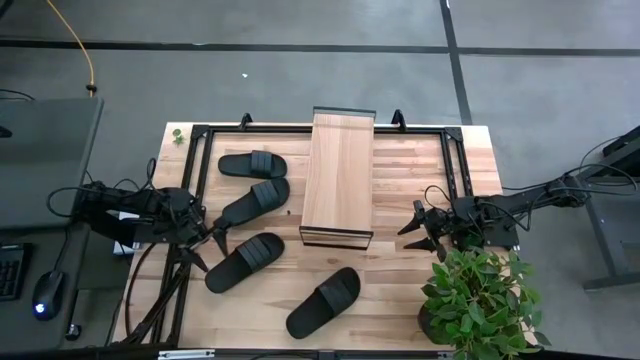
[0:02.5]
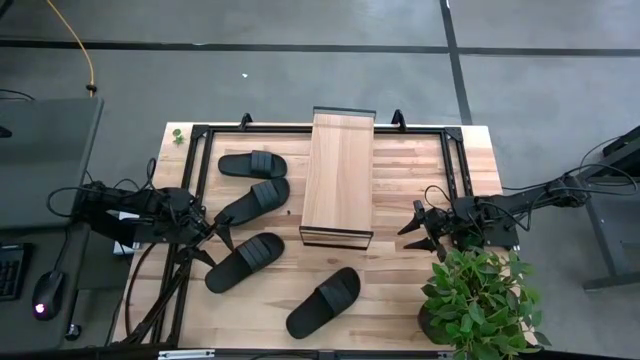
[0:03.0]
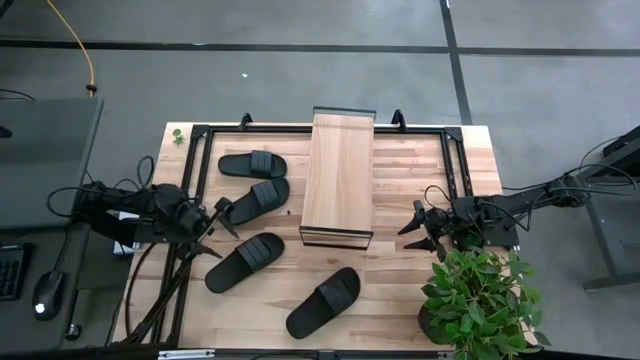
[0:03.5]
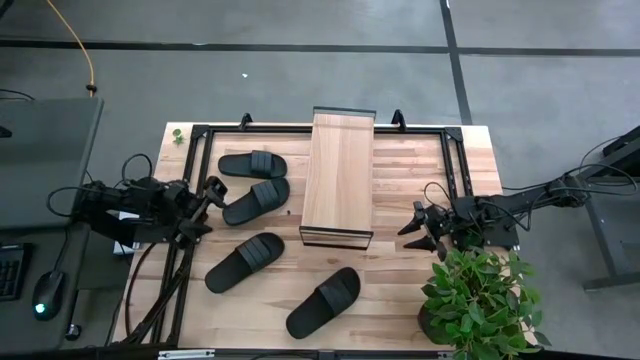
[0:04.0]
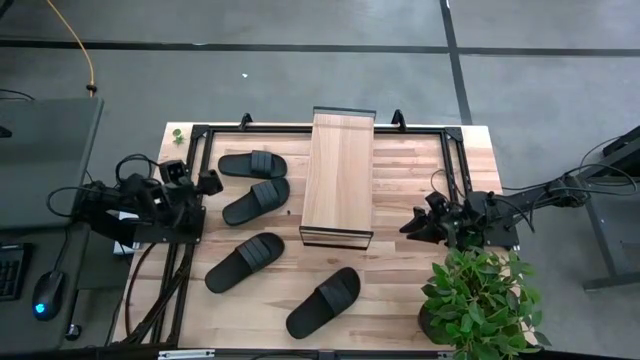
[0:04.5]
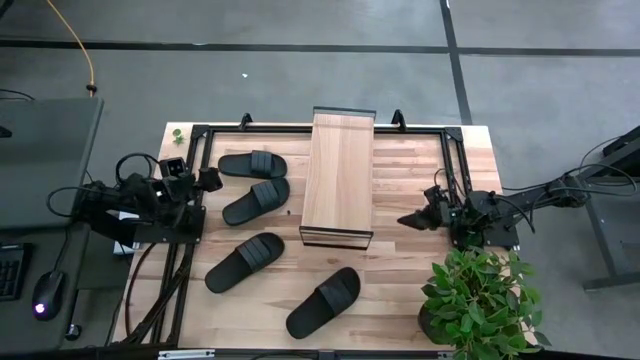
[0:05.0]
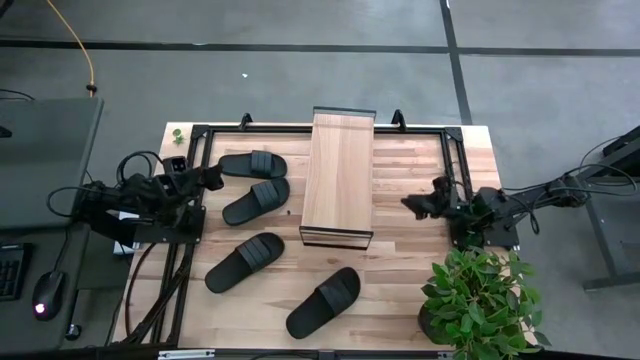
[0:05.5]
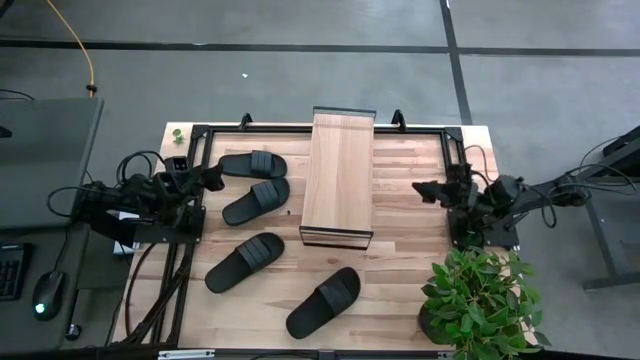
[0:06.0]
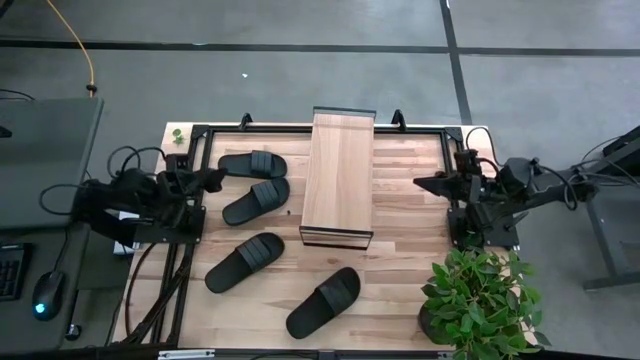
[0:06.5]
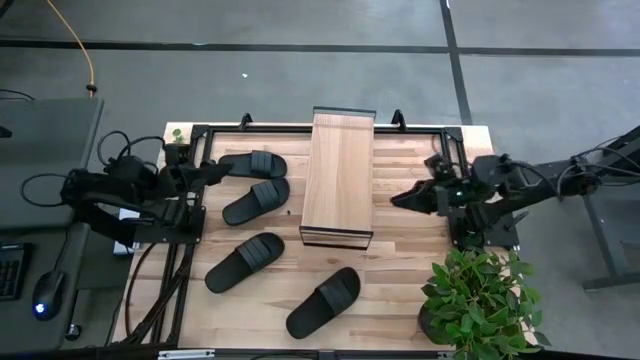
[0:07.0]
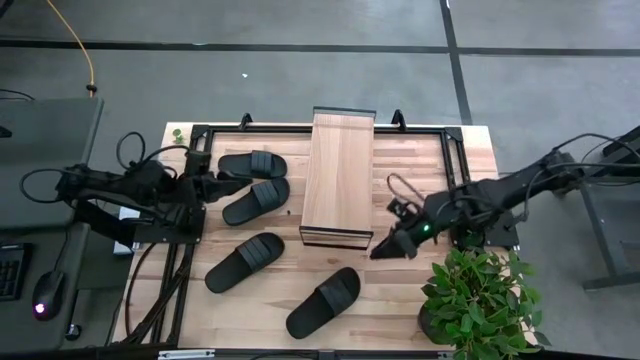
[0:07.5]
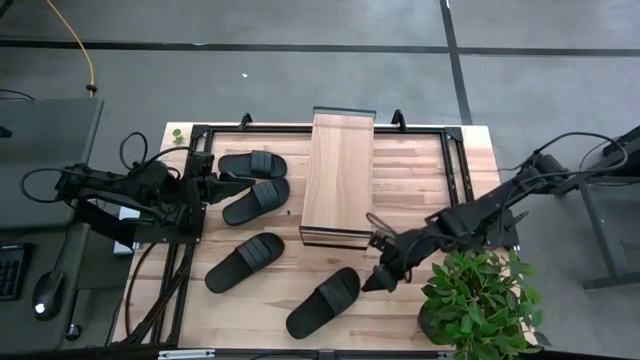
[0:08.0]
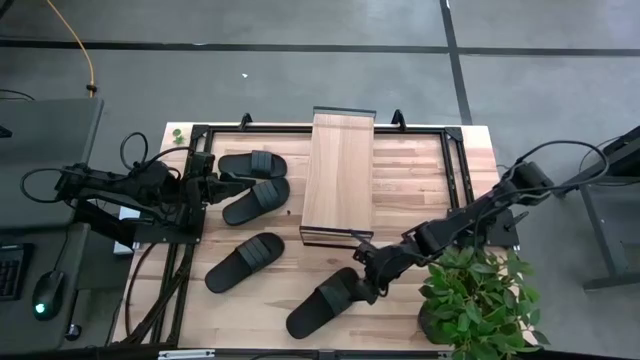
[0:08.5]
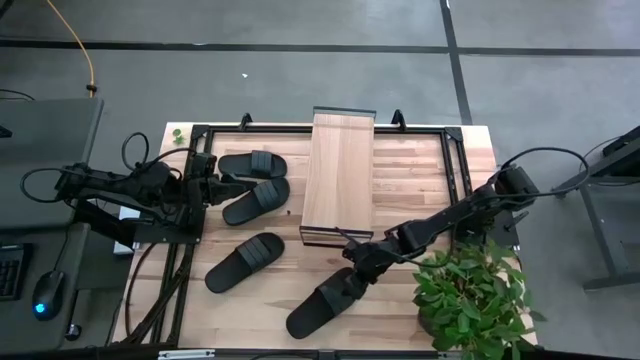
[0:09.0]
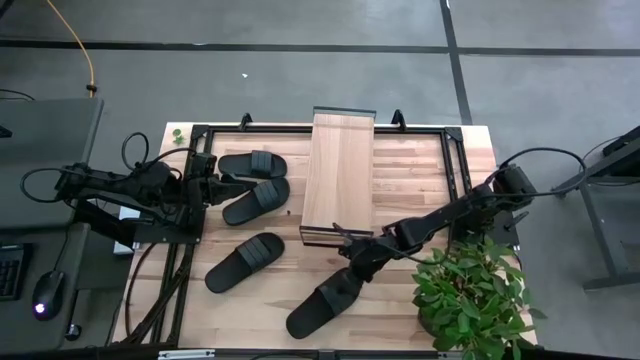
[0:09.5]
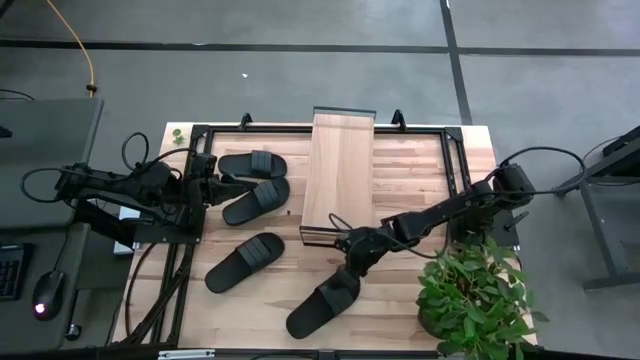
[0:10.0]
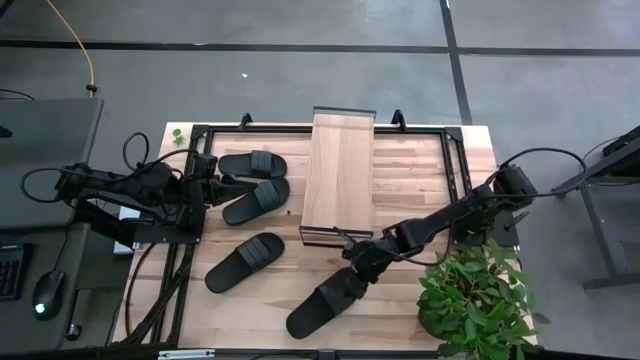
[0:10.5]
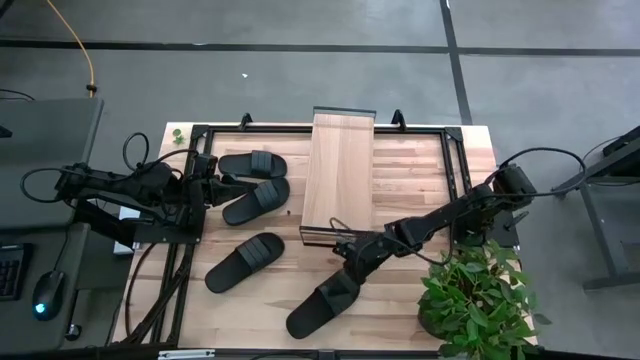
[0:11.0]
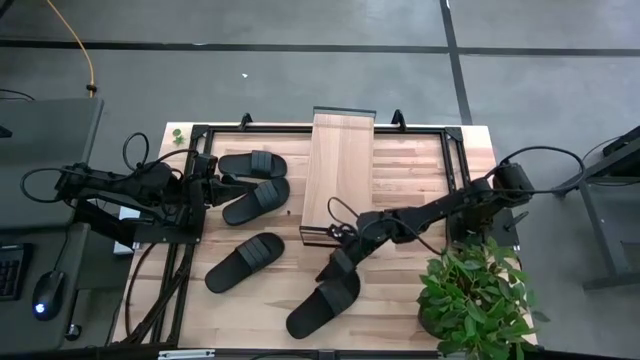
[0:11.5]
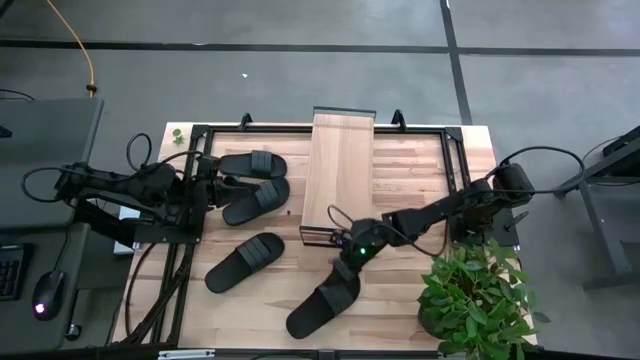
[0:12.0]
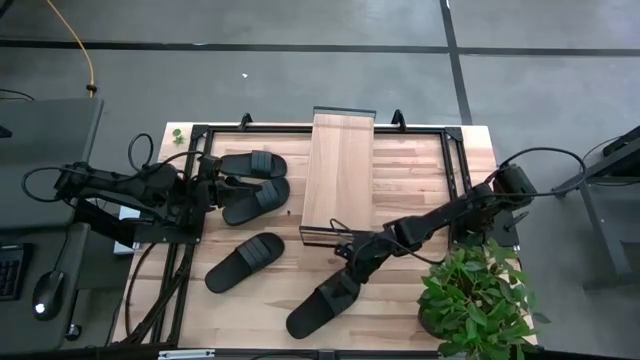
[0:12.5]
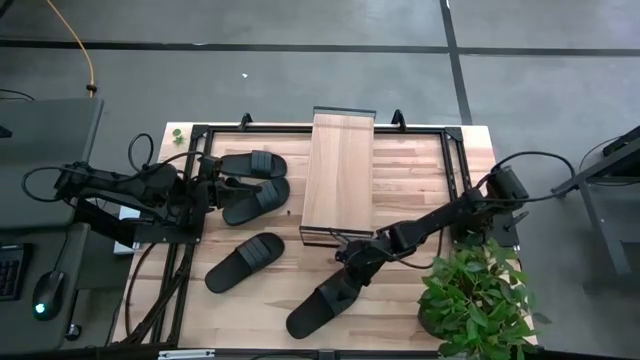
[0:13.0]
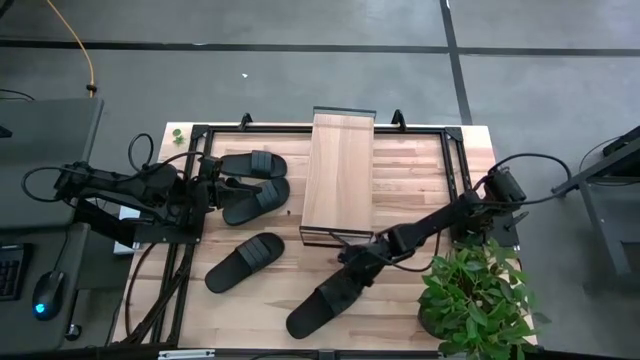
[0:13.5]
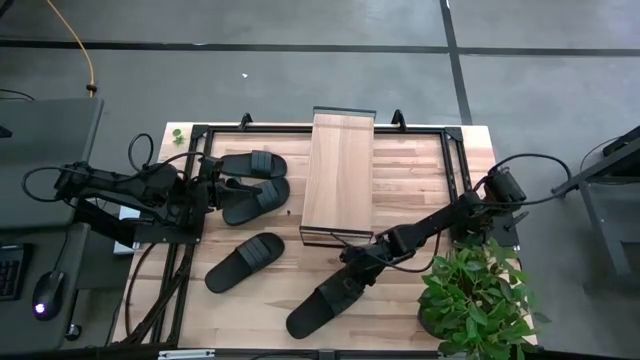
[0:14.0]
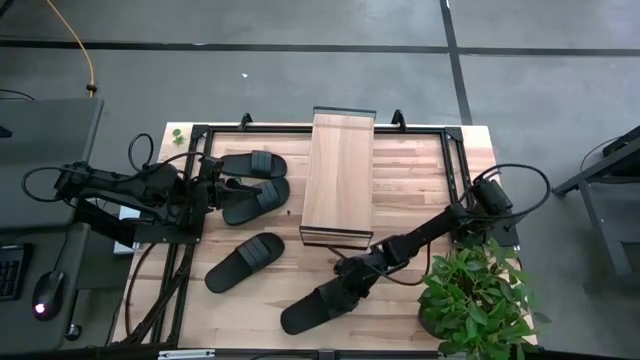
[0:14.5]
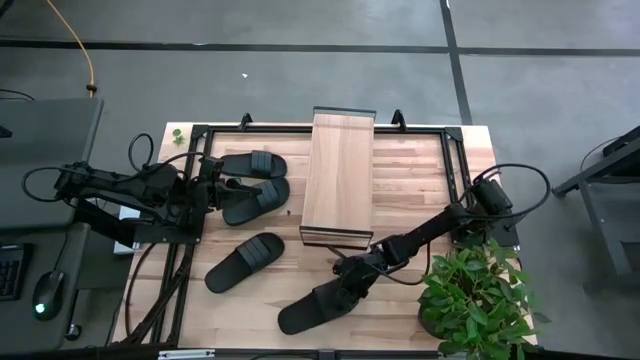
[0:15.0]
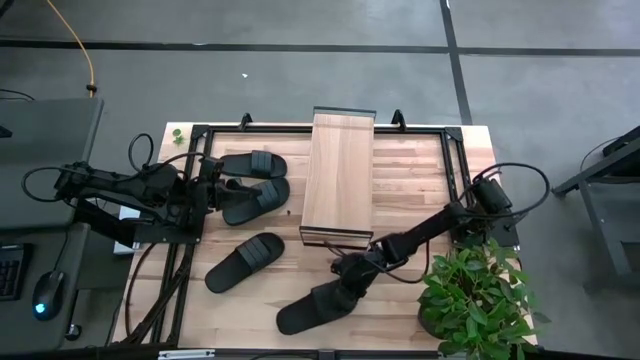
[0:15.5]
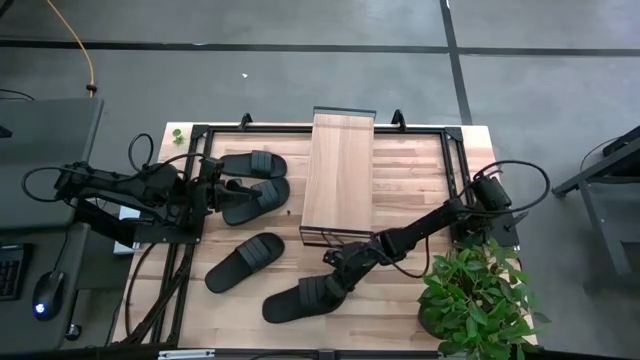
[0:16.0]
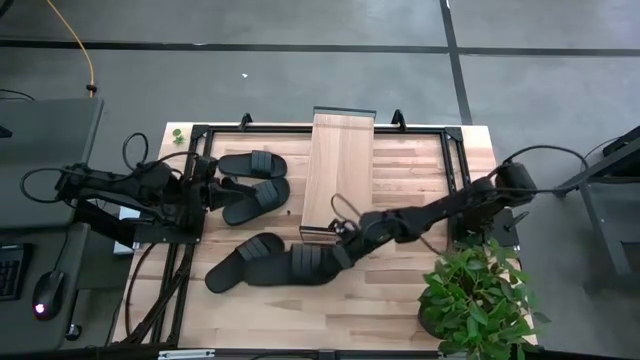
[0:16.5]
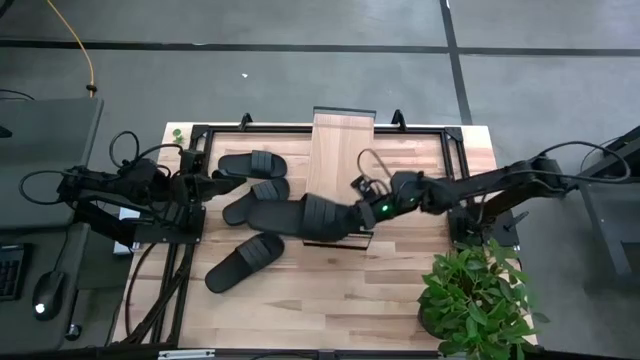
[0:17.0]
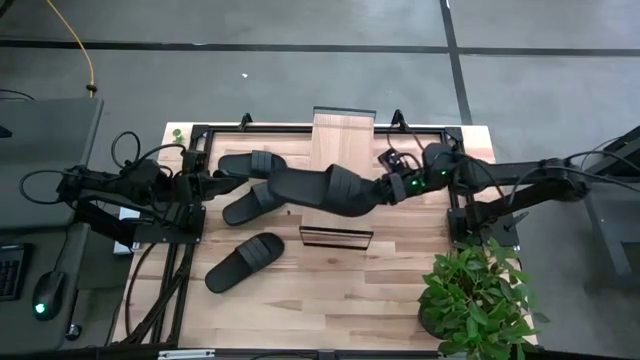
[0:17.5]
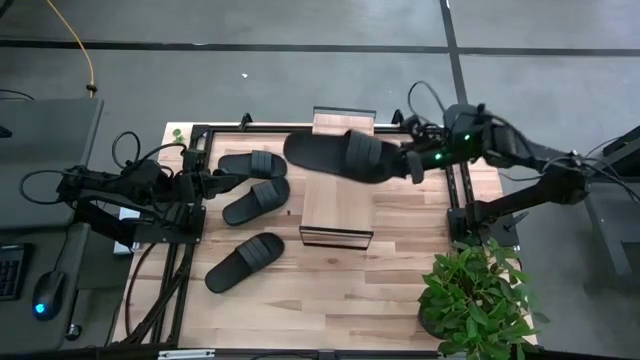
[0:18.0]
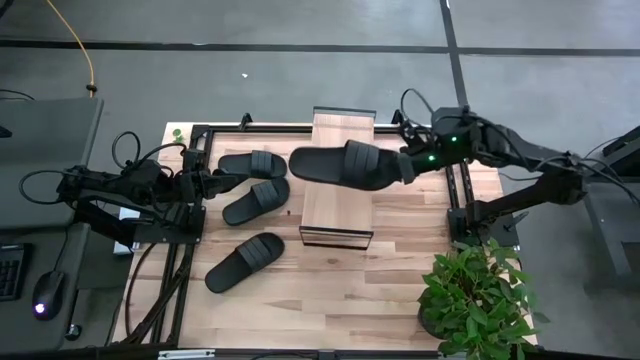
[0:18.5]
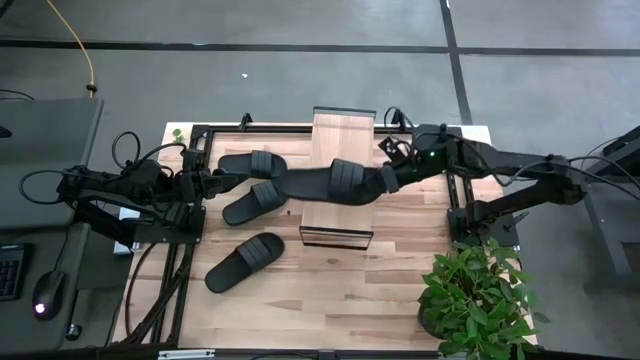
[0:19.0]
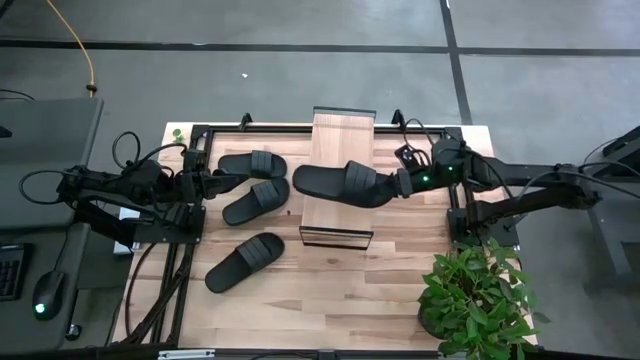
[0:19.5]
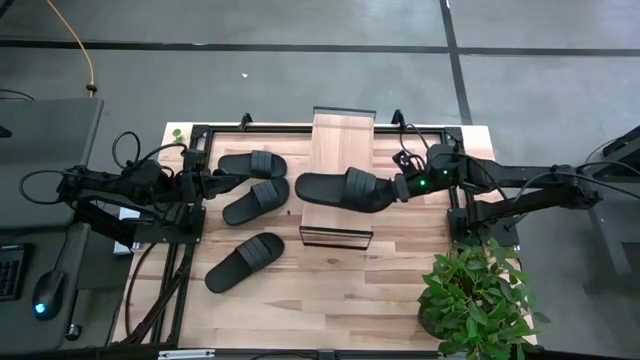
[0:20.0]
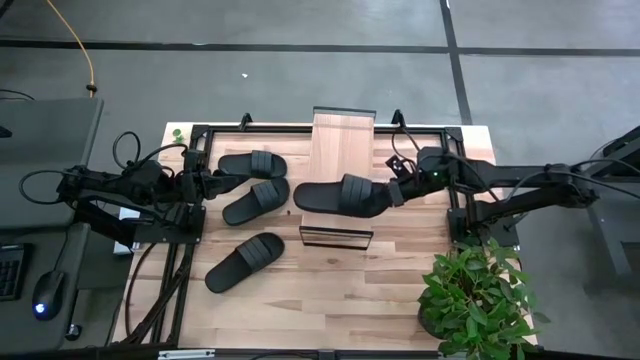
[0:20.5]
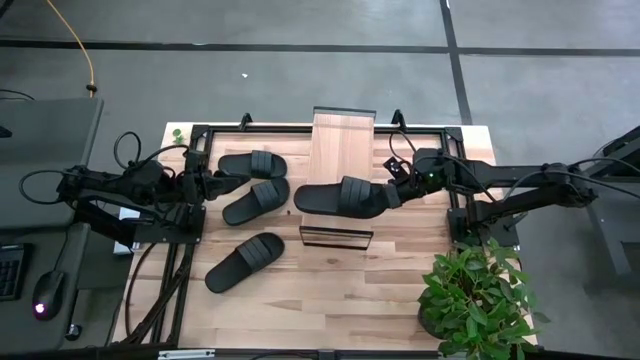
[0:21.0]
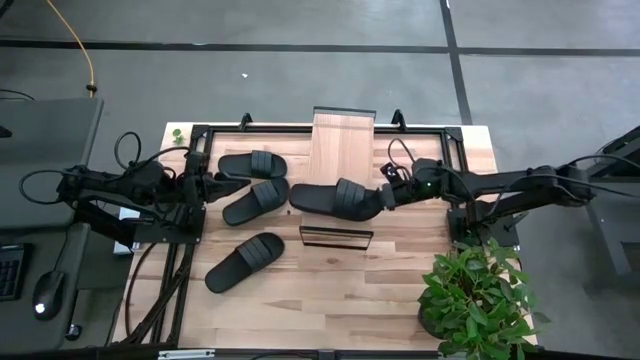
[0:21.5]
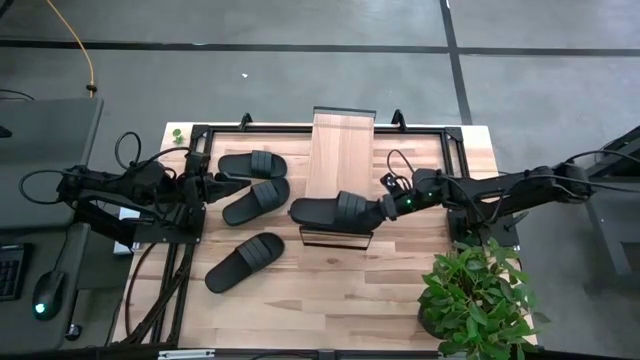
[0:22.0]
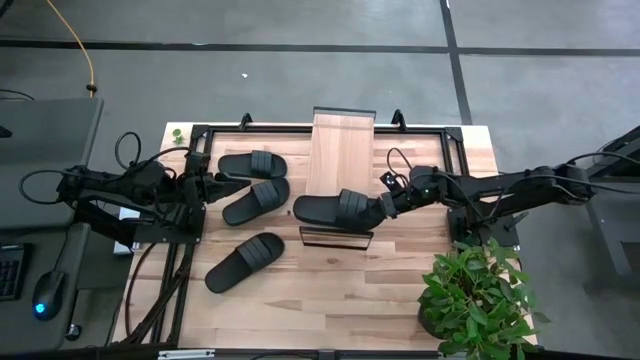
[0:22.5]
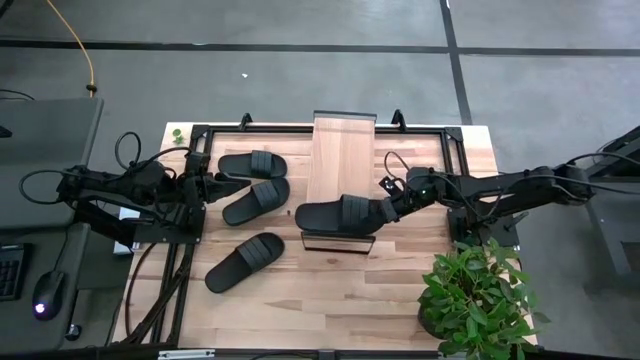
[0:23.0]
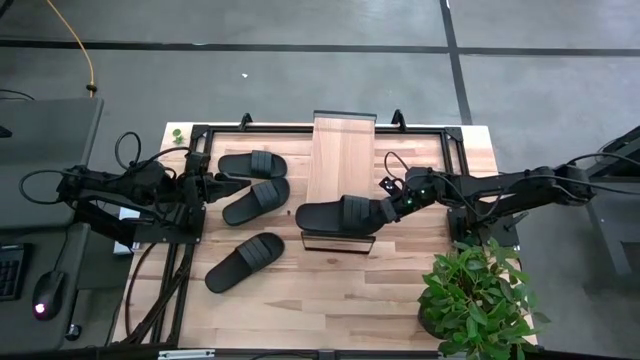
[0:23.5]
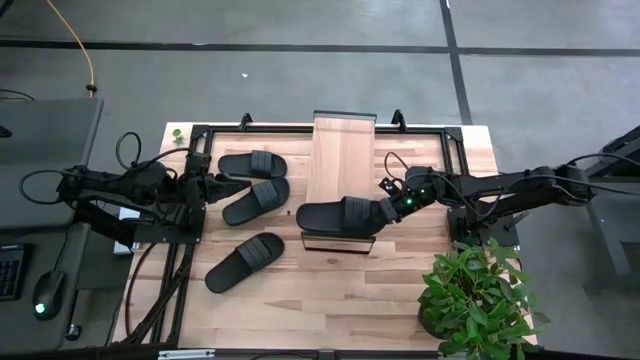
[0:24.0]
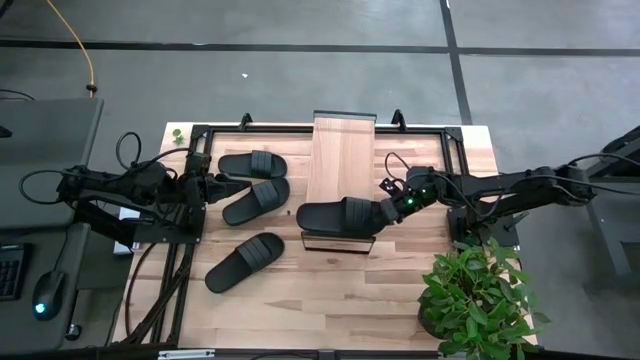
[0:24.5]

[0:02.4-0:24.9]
Task: Pick and place slides into the shelf
Put the black slide on the shelf
